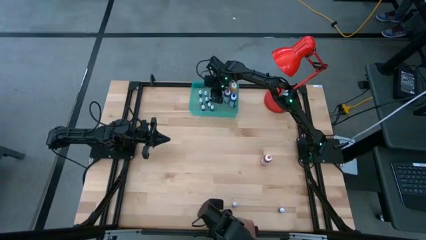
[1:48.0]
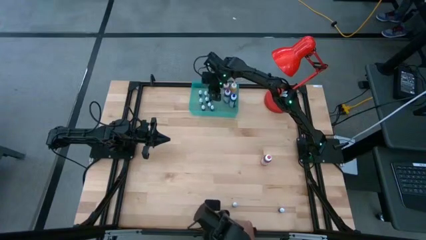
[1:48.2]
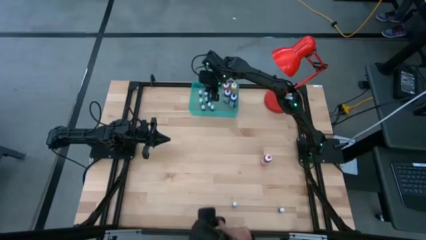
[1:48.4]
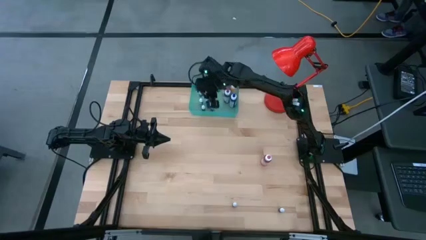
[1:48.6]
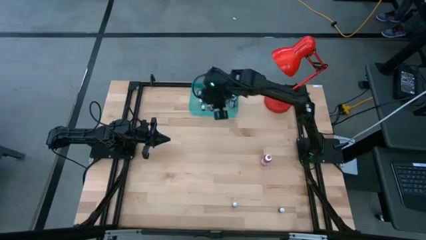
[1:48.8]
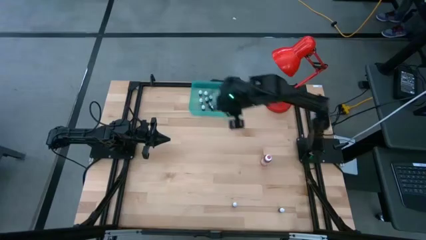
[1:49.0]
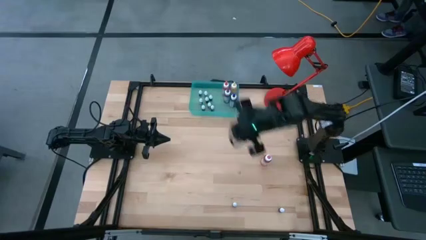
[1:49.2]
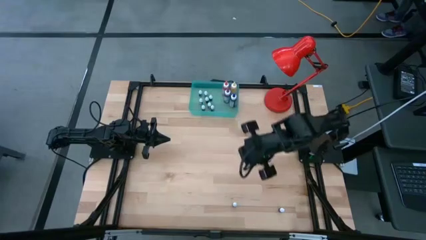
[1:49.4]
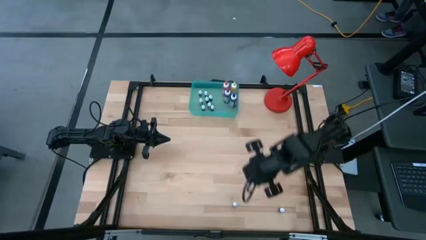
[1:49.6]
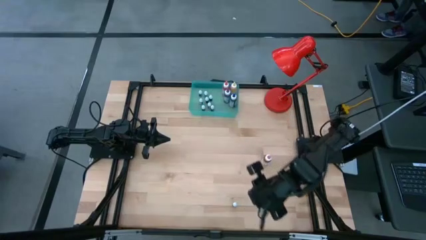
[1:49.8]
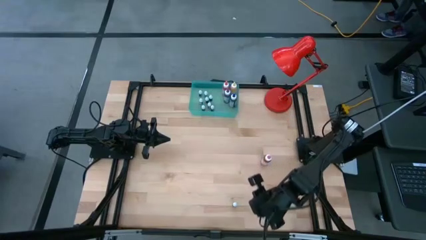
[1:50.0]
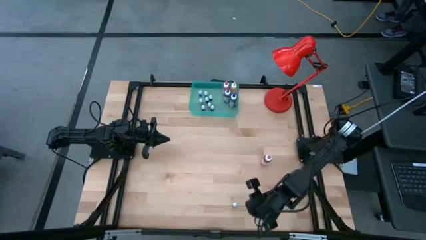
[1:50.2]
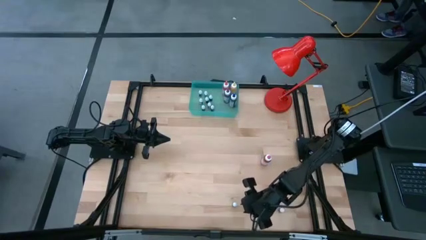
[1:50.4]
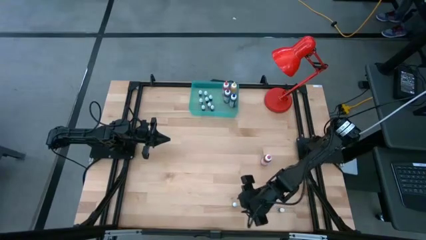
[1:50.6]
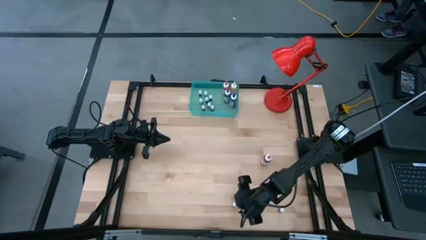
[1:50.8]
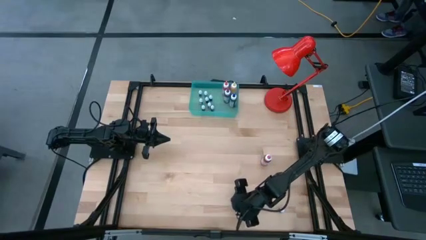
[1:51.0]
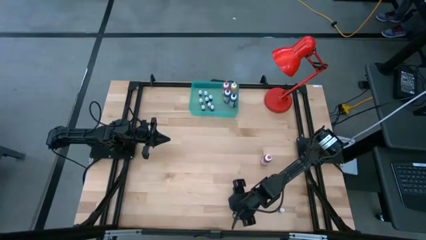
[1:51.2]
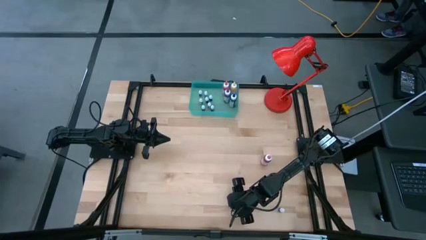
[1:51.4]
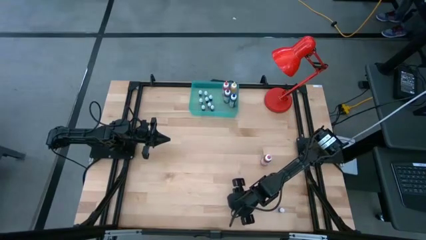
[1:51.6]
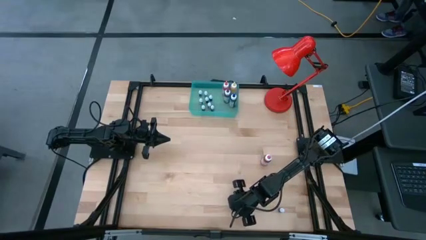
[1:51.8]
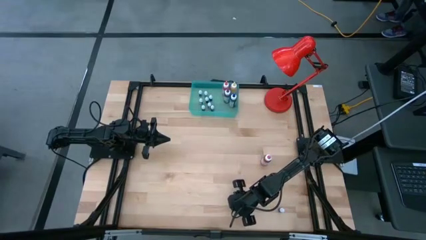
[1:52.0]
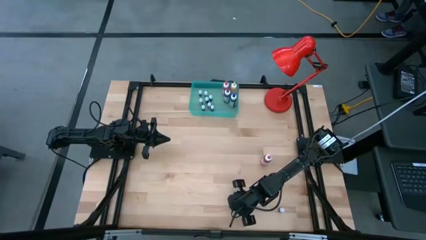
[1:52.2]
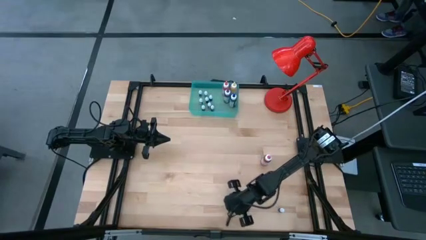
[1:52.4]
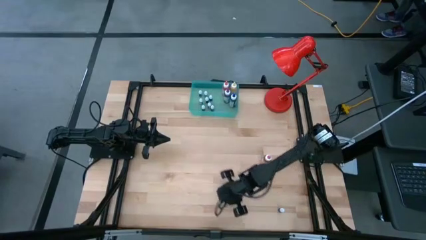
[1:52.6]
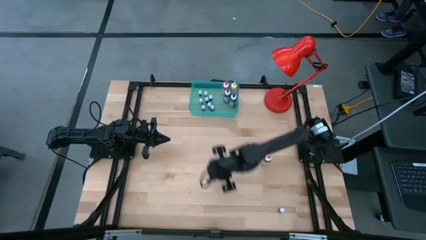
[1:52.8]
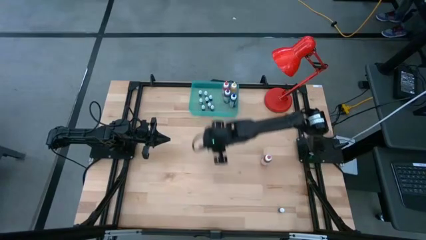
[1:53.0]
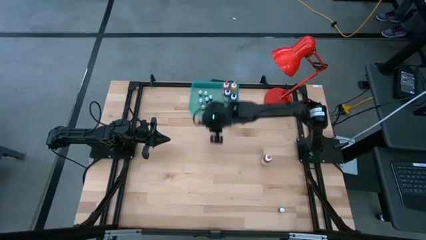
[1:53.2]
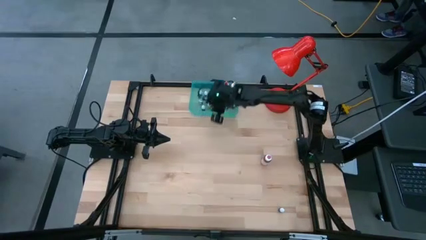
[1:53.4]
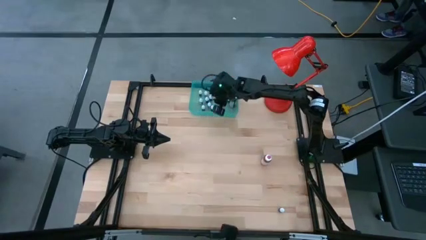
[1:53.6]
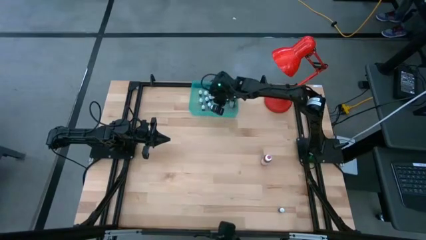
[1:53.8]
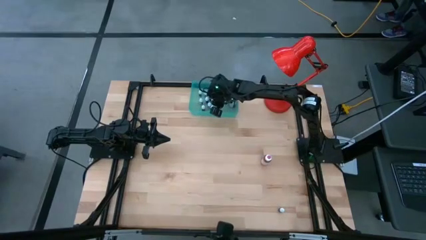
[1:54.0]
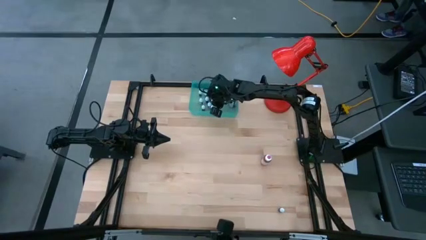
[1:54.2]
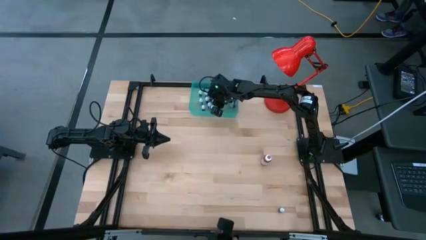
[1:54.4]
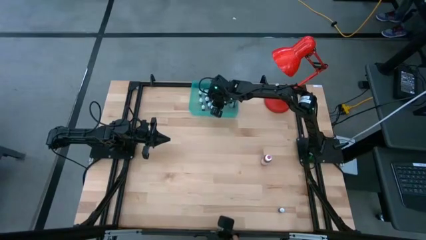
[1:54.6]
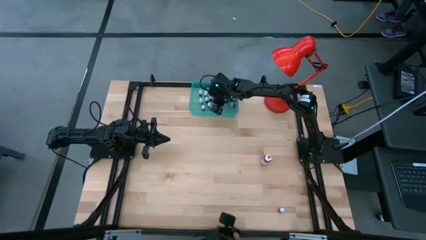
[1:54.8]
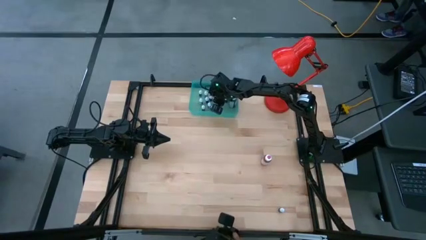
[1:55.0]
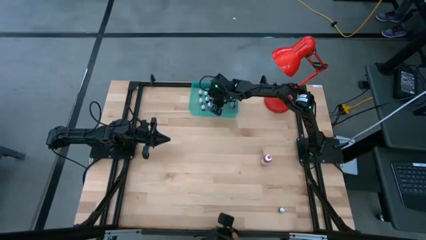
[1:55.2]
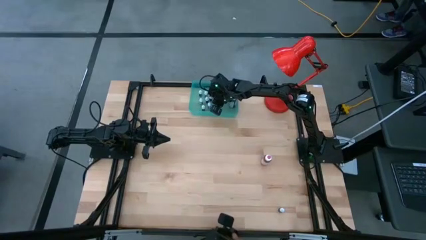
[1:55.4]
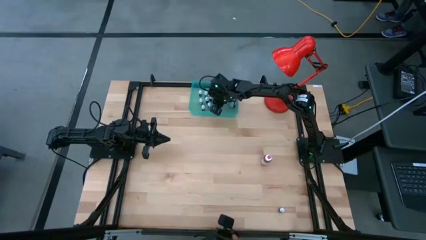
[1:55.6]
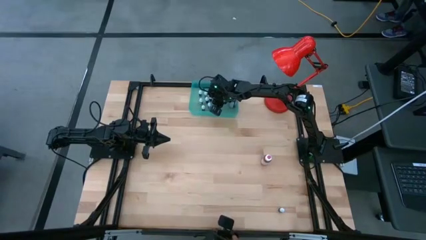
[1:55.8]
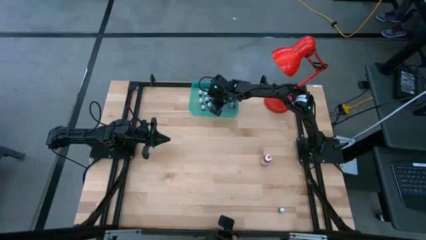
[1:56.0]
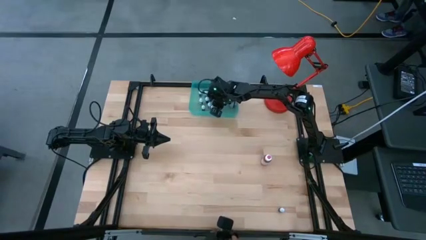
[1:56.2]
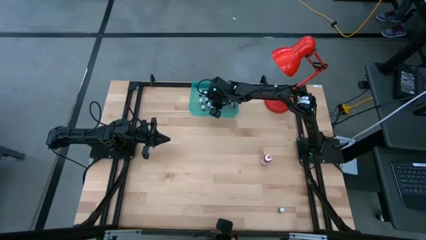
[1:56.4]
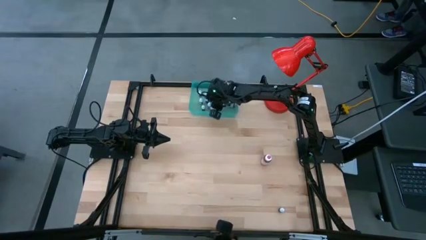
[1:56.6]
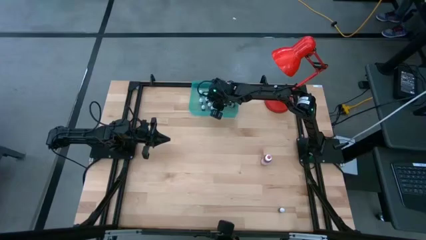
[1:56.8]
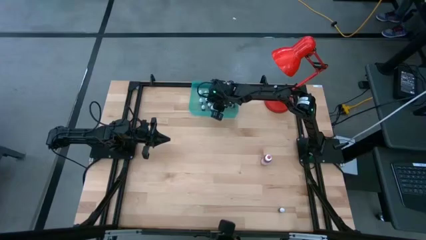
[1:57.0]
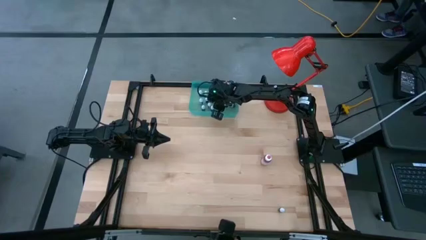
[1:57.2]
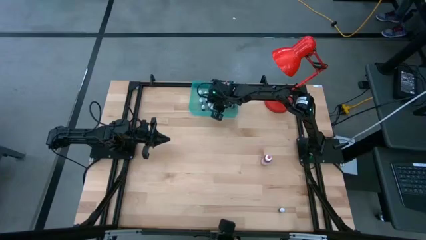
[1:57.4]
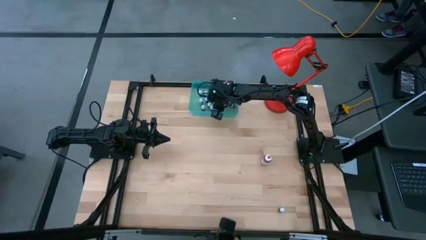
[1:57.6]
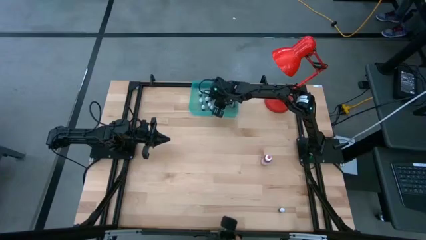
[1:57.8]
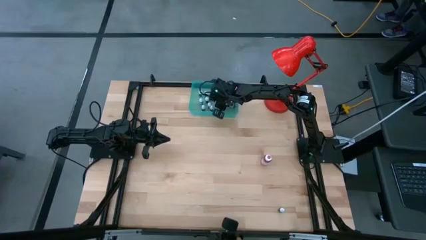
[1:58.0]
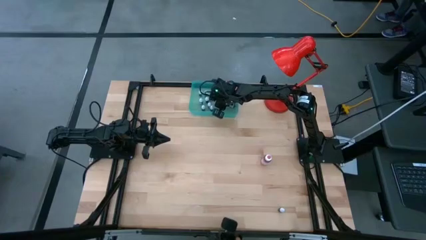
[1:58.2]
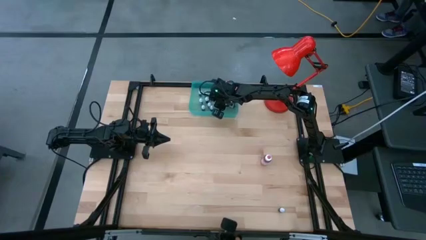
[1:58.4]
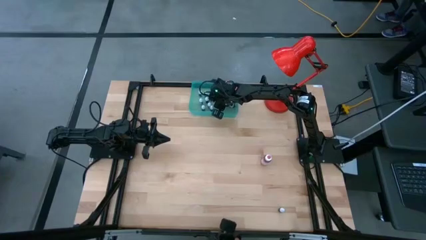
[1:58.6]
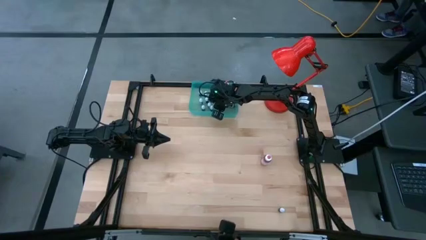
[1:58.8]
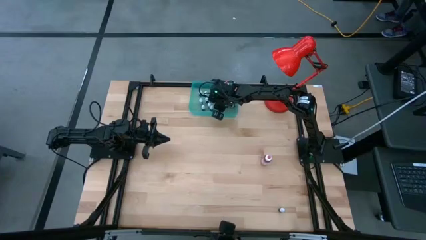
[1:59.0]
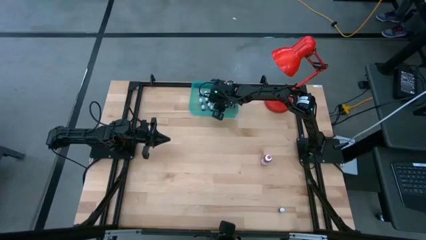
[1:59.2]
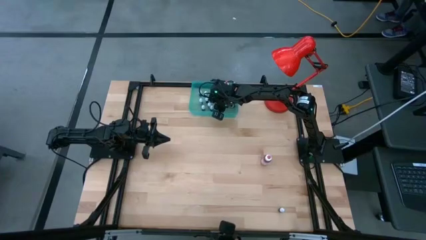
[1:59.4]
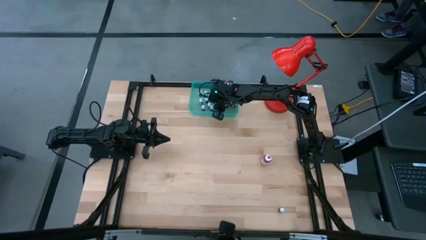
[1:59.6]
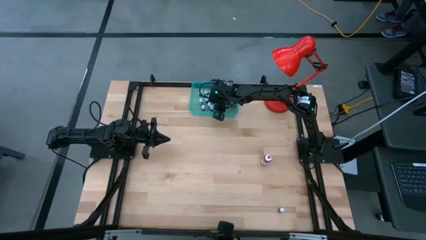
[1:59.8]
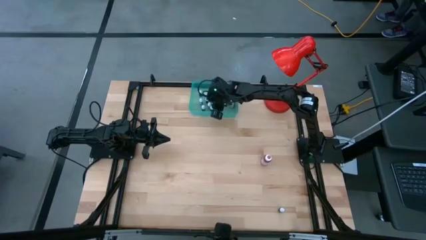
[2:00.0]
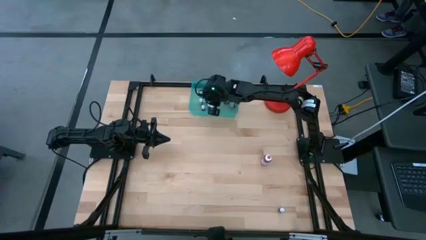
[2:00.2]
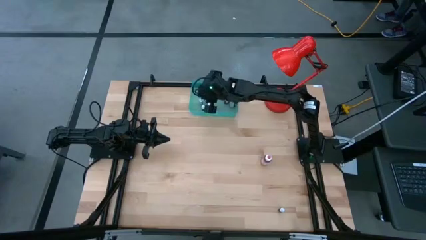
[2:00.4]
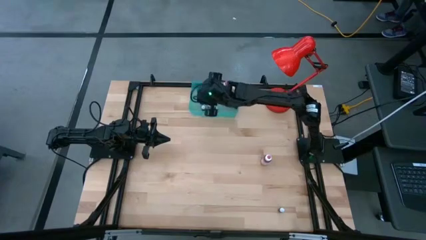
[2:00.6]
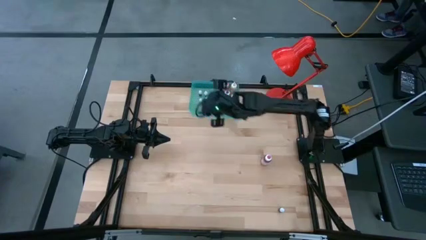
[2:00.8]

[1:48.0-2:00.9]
Task: Pick & Place food coloring
Put the blue food coloring bottle into the bin

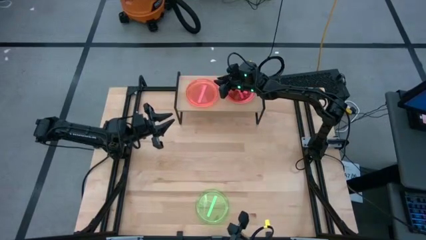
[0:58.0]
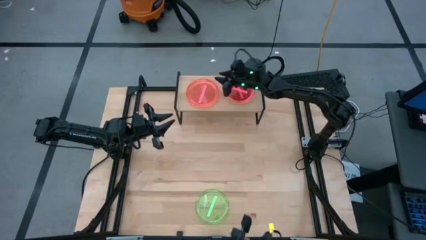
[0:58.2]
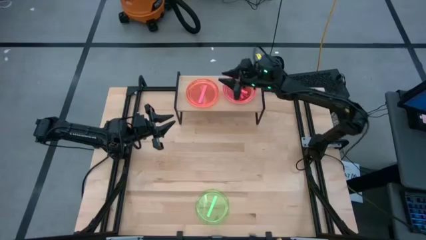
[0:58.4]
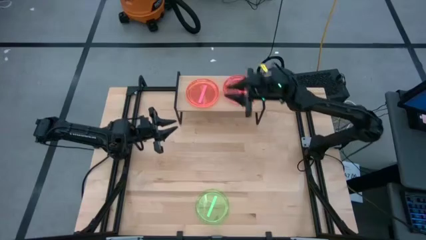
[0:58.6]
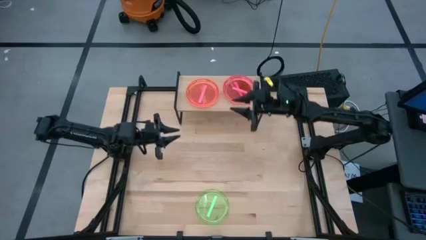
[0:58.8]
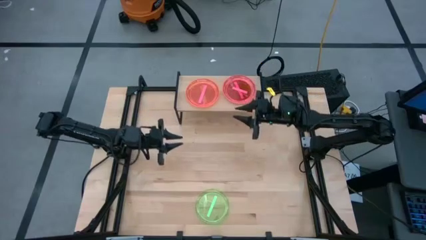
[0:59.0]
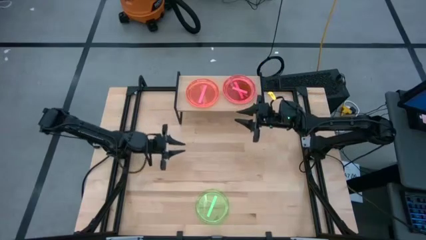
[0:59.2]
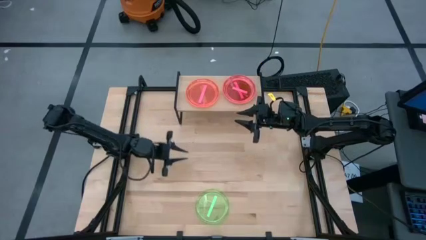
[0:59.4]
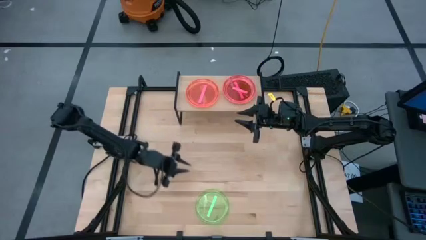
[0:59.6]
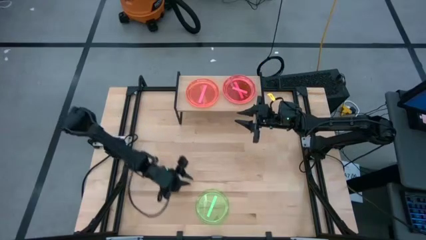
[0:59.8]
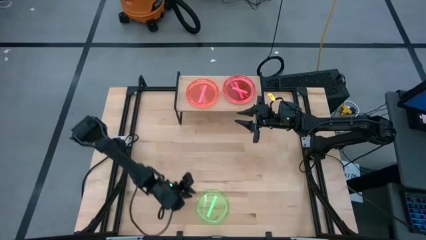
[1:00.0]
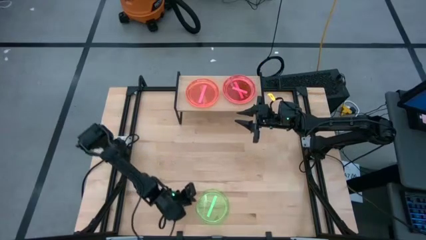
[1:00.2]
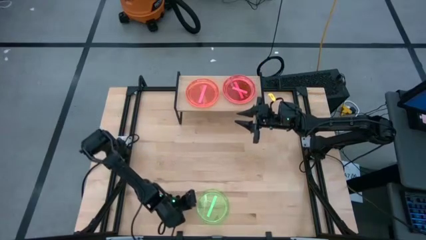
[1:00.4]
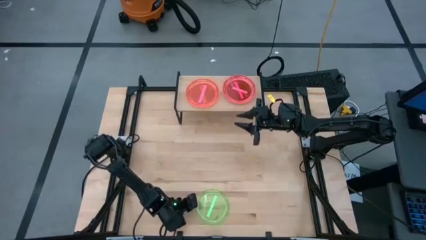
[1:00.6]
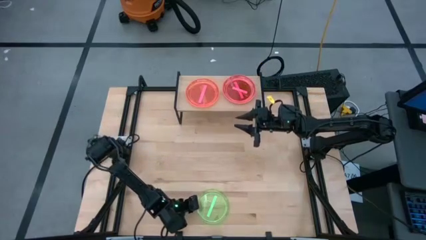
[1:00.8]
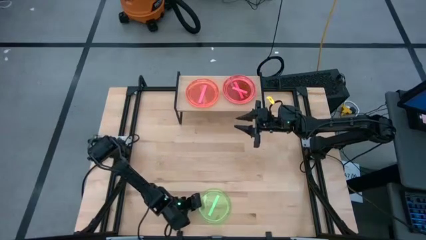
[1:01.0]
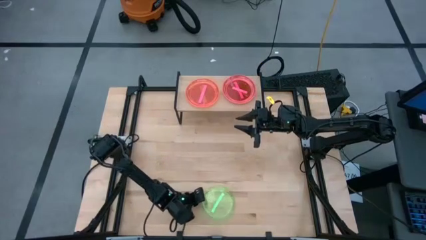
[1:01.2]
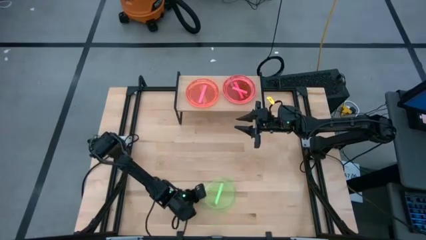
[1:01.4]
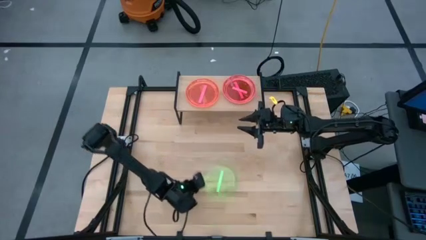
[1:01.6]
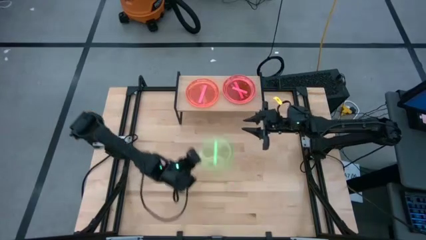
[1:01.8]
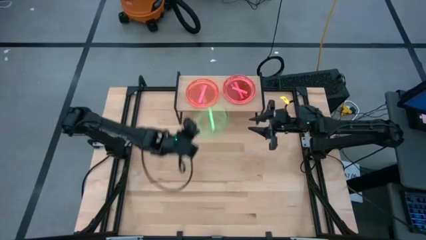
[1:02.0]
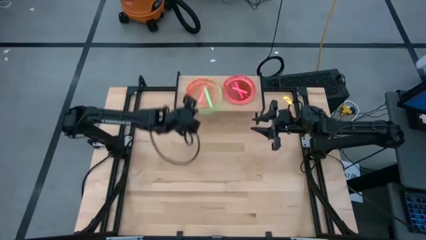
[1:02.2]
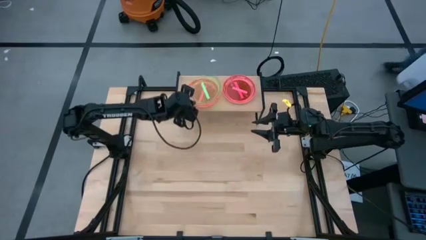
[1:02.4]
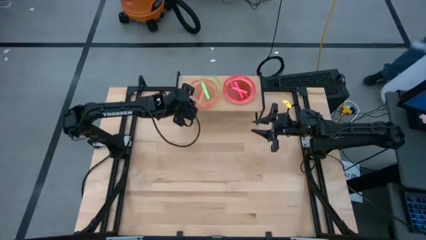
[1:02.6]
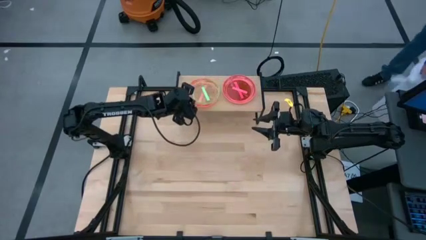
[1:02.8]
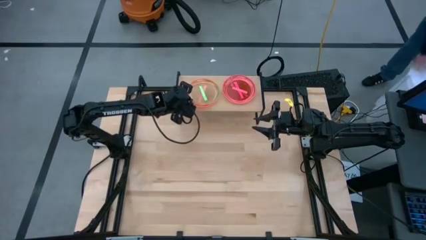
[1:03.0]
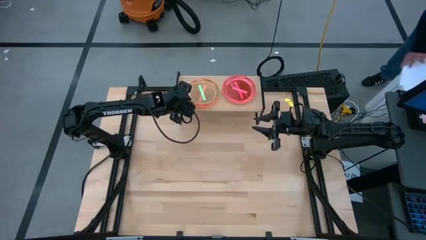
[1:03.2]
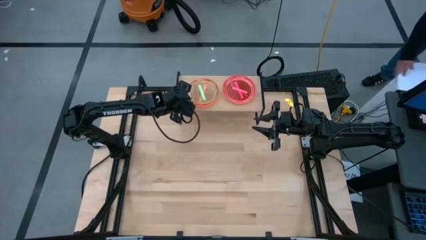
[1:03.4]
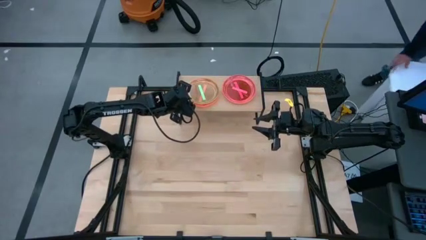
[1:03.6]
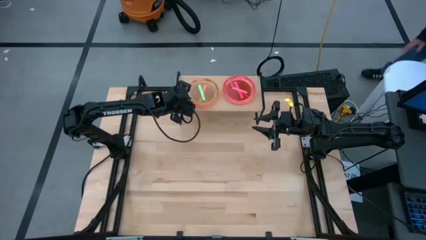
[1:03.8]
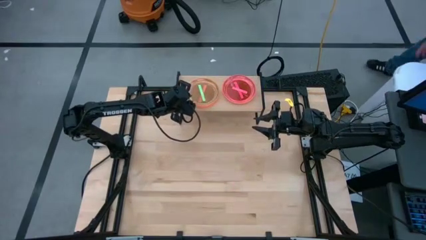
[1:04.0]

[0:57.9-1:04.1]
Task: Place and stack plates onto a shelf
Stack the green plate on top of the pink plate on the shelf
